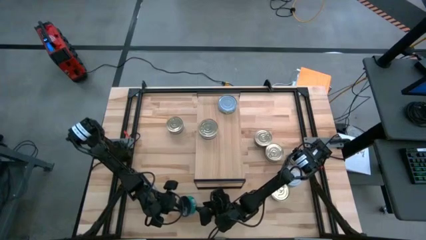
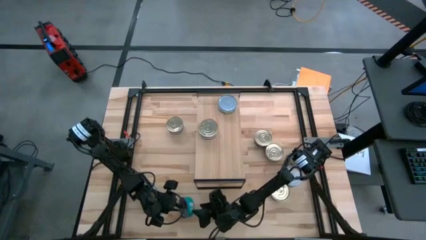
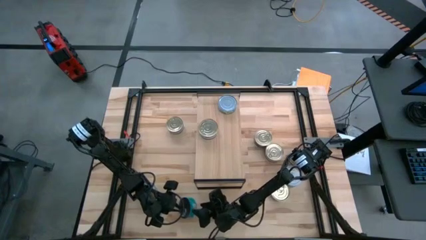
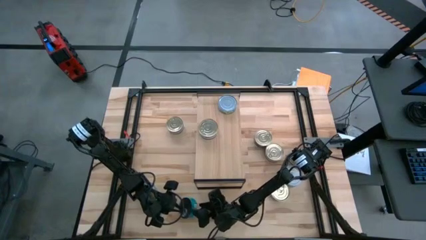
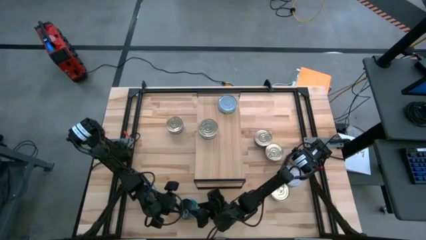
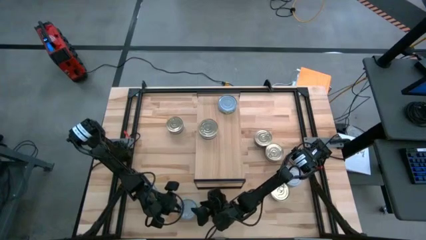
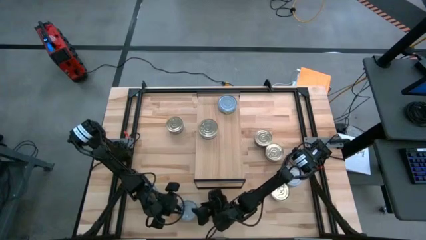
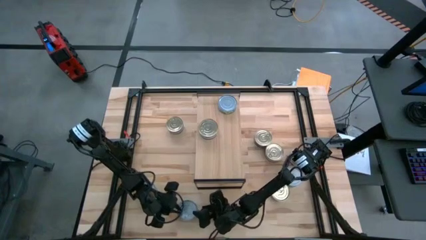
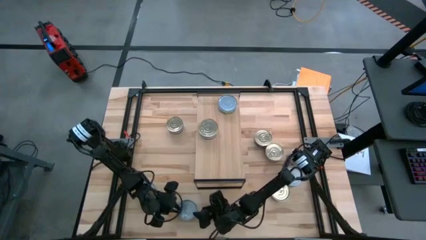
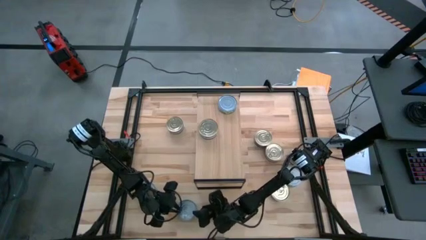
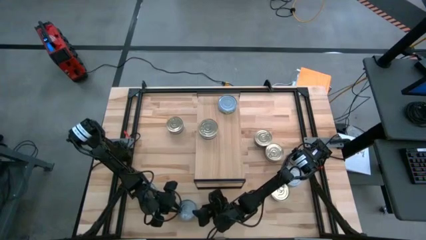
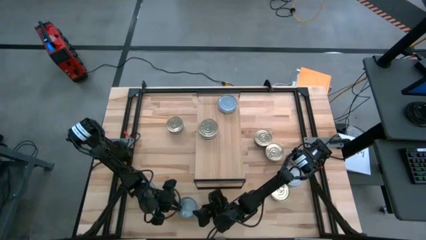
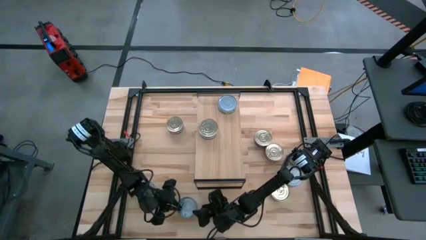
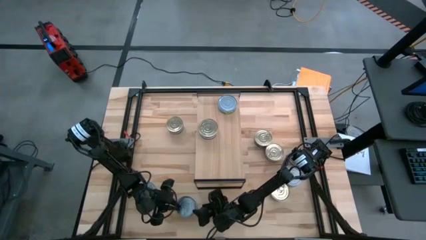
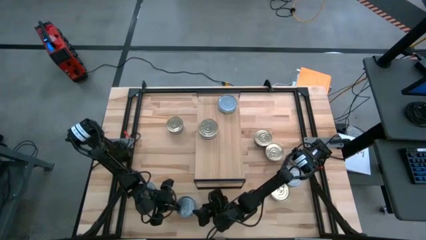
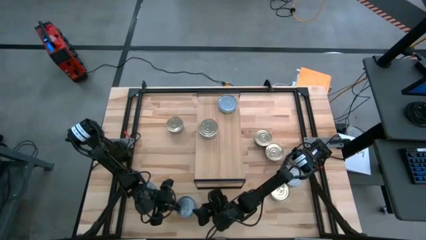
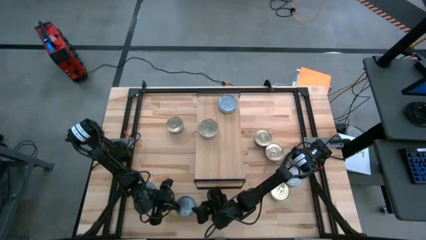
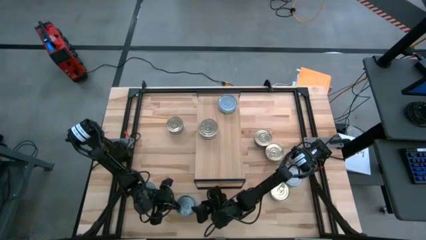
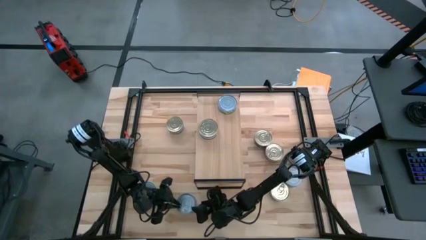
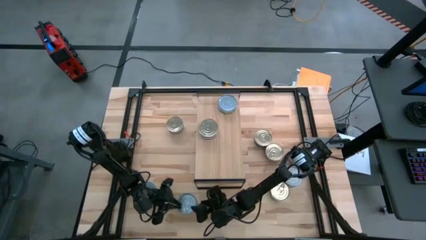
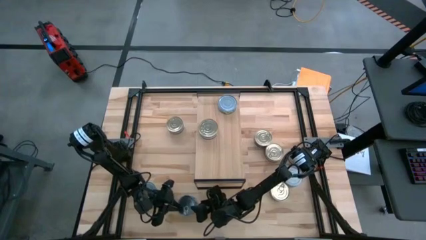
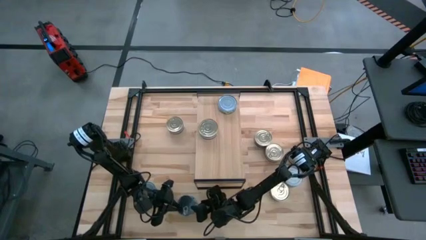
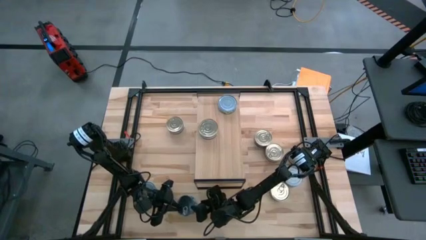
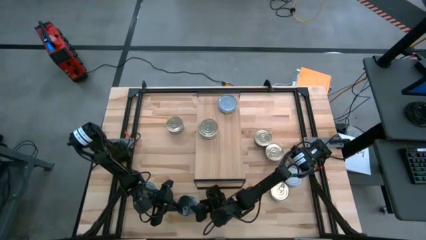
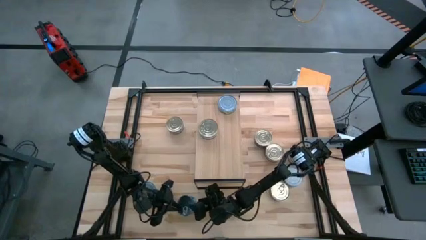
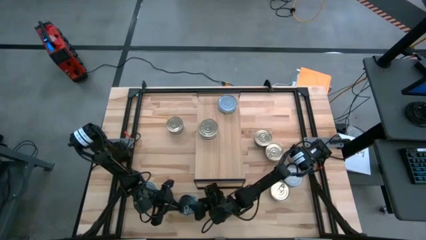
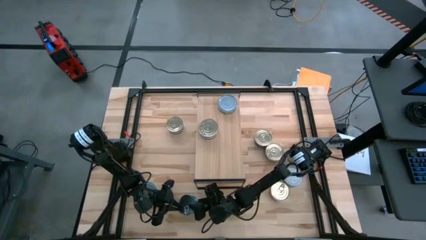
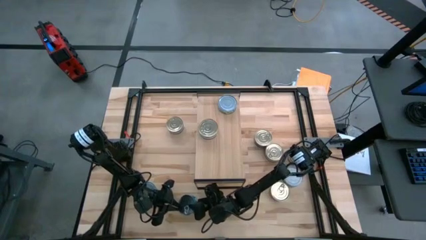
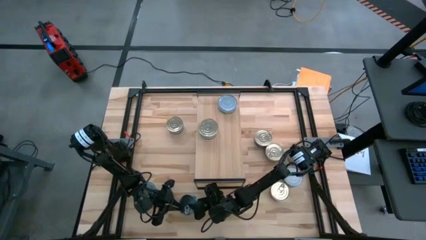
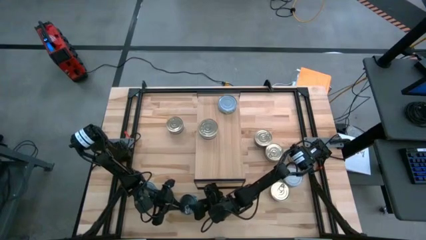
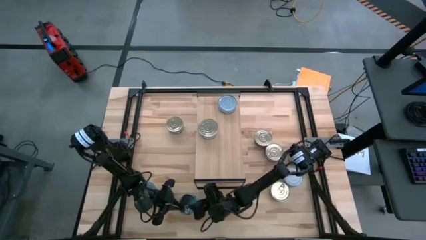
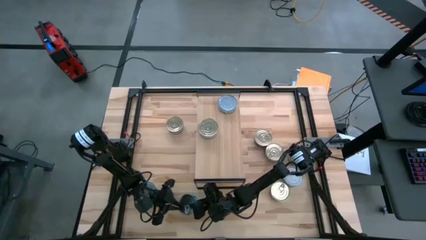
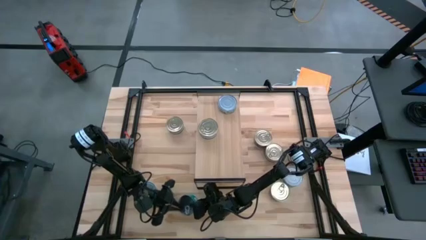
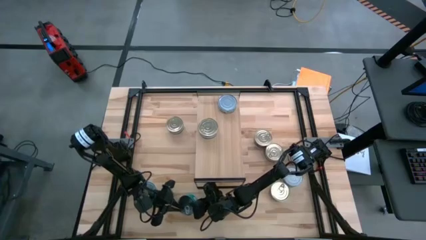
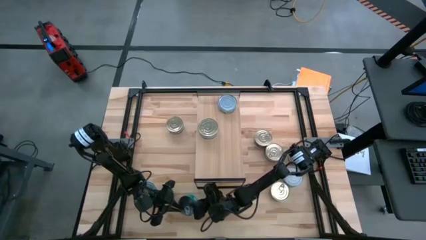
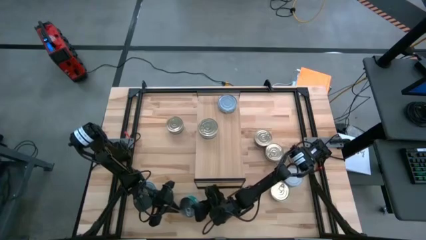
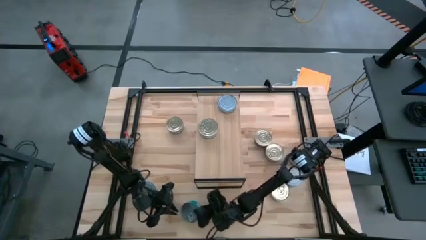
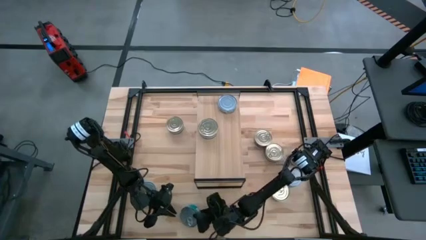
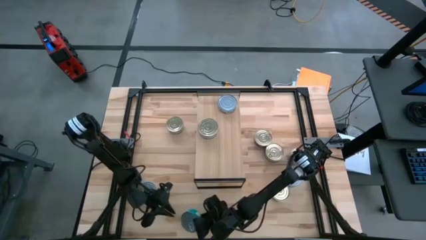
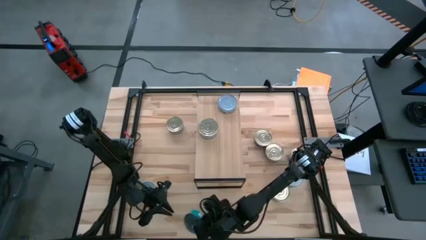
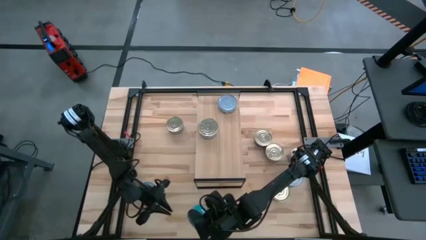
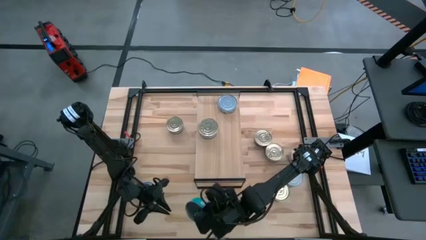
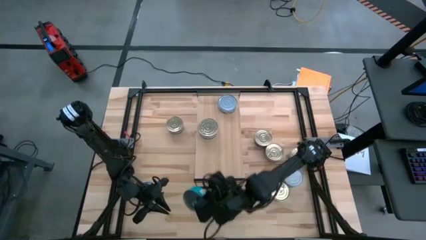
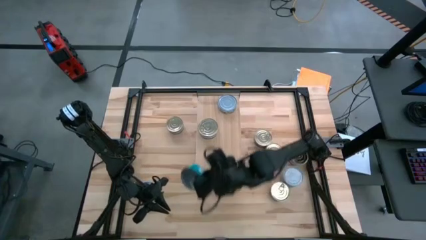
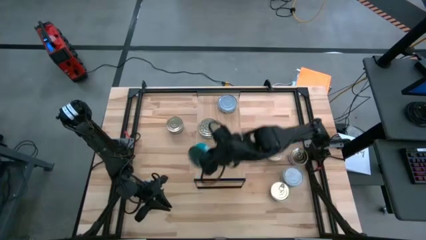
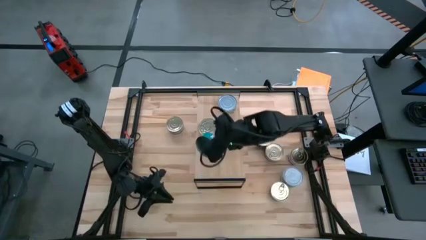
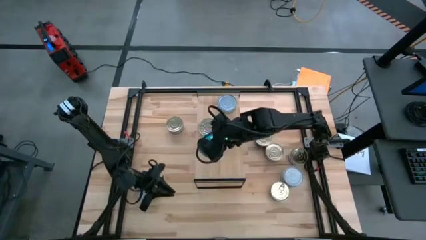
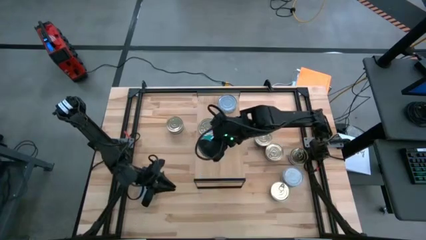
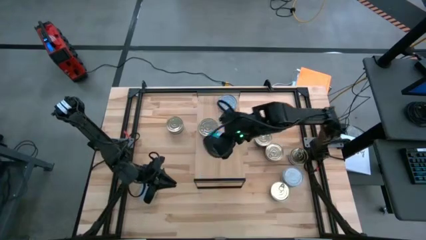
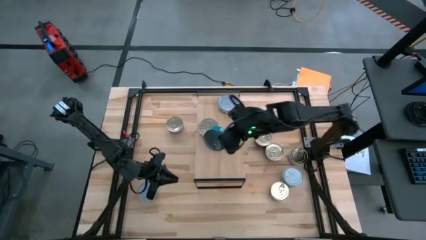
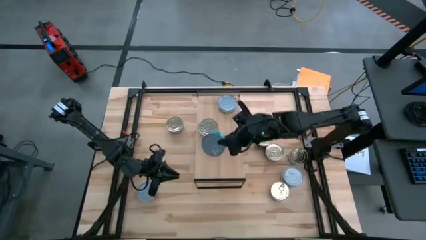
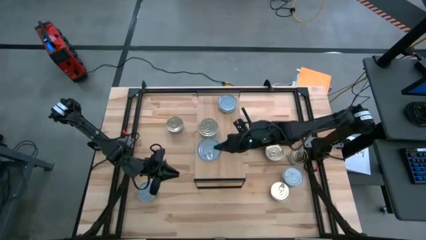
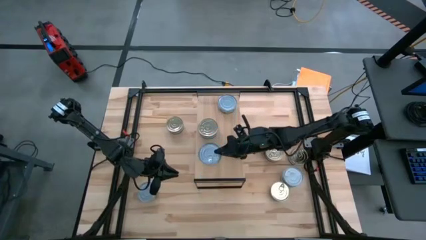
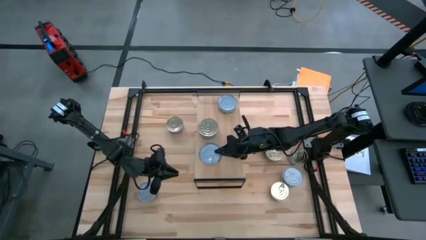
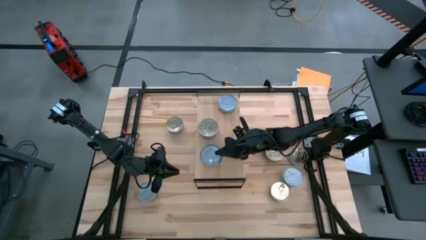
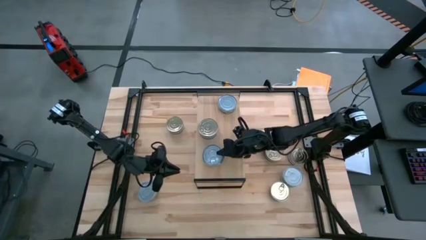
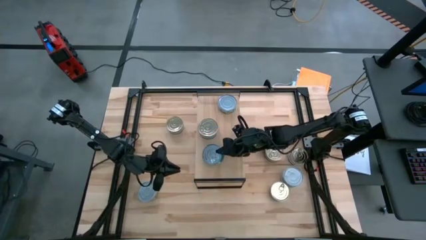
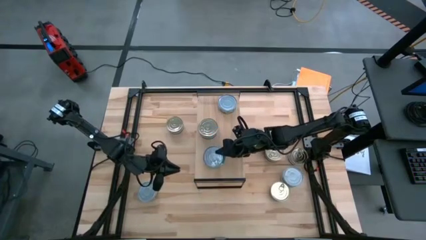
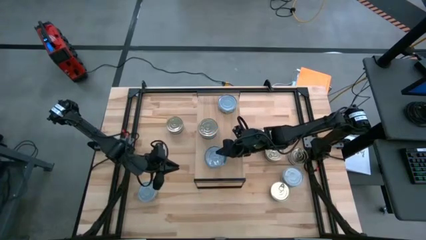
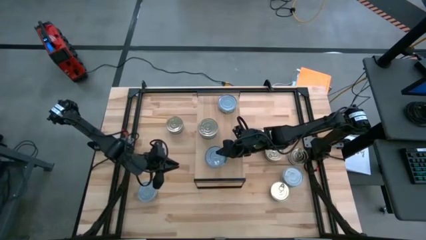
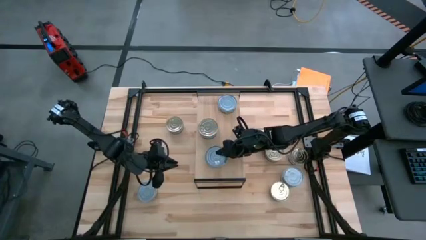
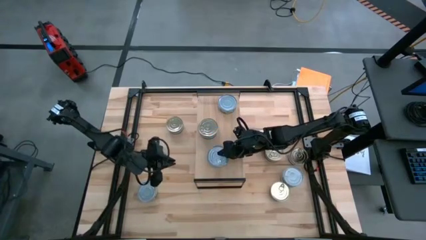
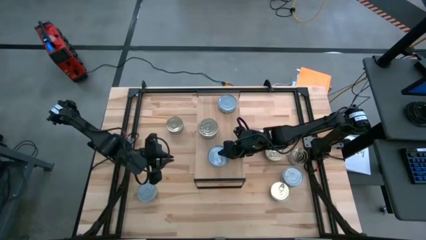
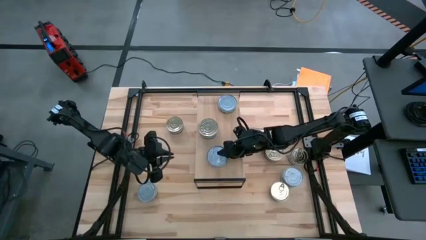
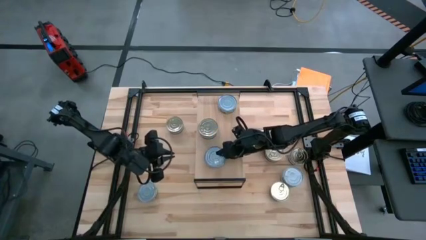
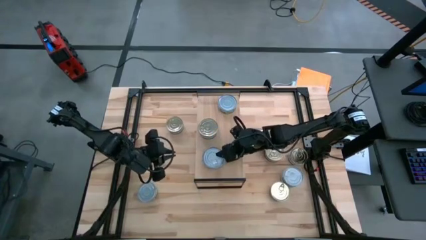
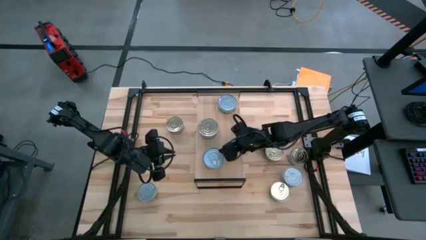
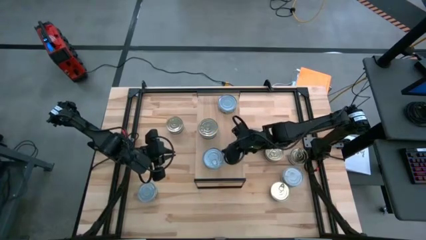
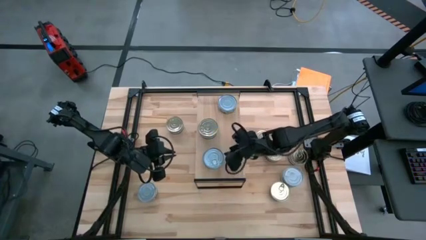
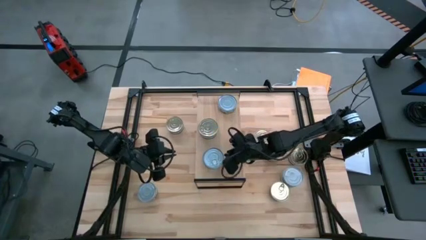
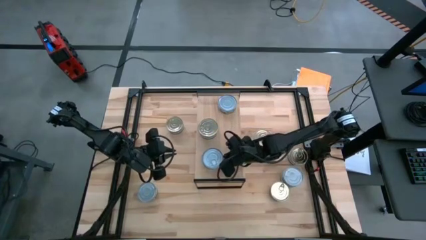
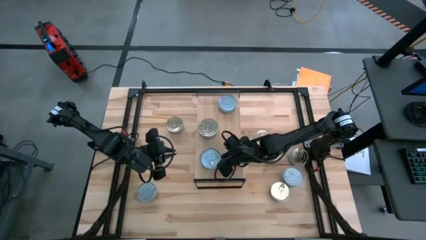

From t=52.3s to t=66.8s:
Task: Stack canned seafood by type on shelf
Put the green-blue tuna can on the shelf
